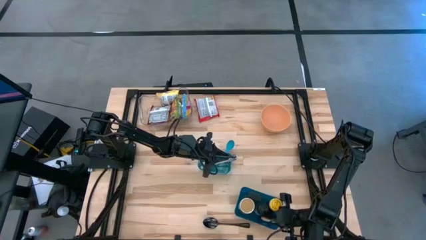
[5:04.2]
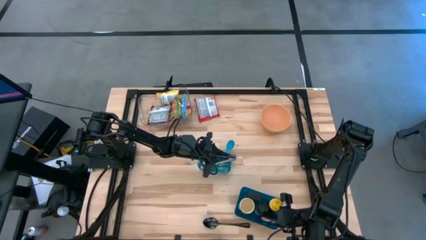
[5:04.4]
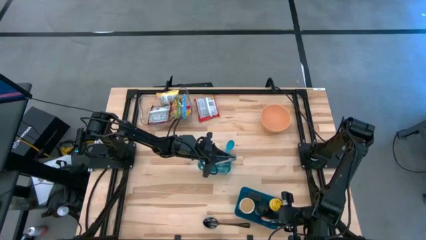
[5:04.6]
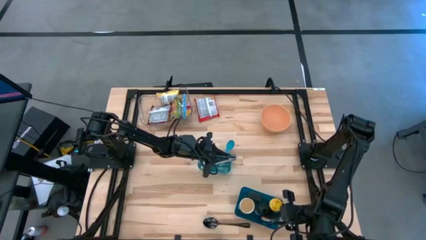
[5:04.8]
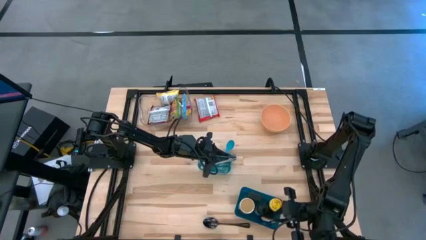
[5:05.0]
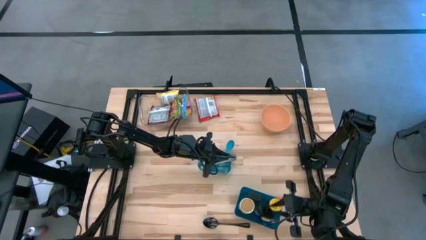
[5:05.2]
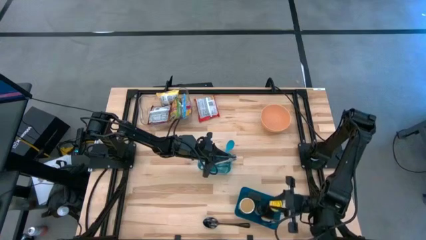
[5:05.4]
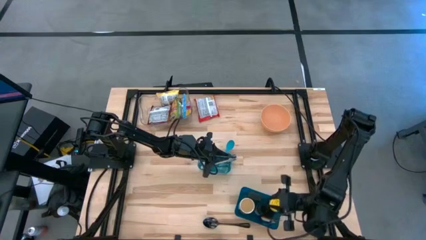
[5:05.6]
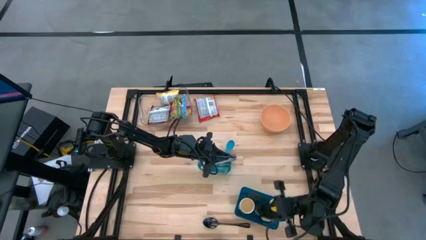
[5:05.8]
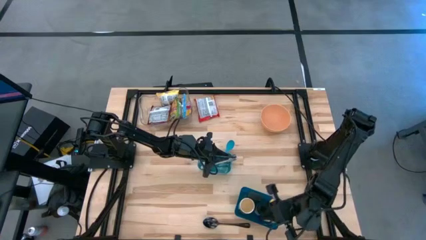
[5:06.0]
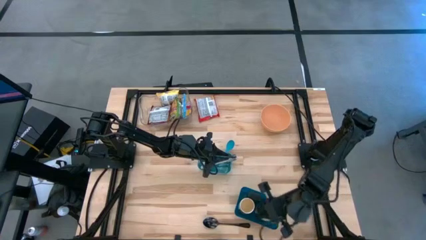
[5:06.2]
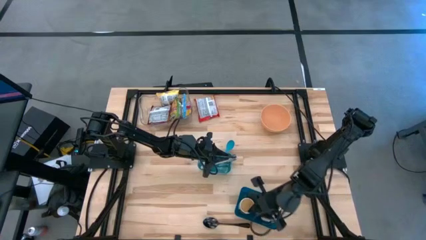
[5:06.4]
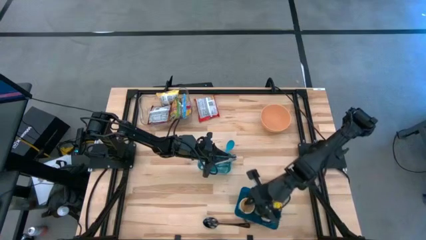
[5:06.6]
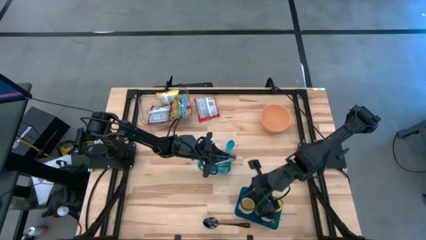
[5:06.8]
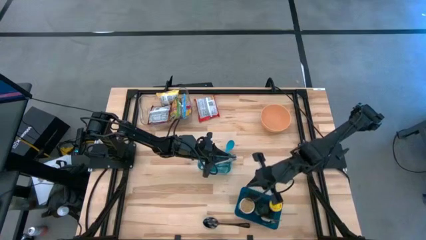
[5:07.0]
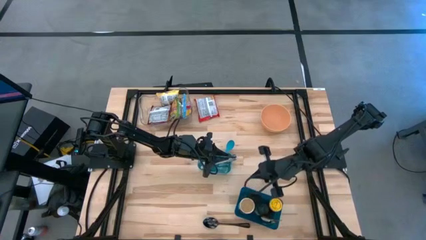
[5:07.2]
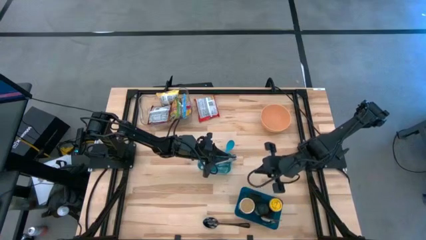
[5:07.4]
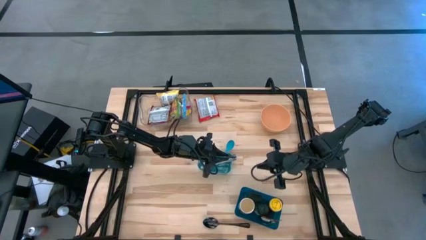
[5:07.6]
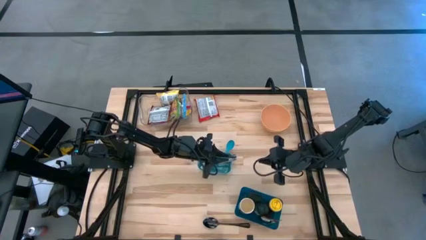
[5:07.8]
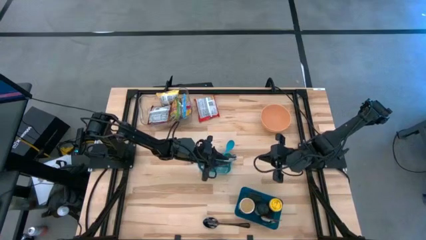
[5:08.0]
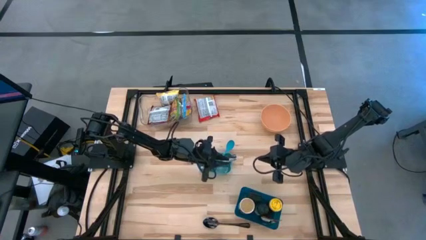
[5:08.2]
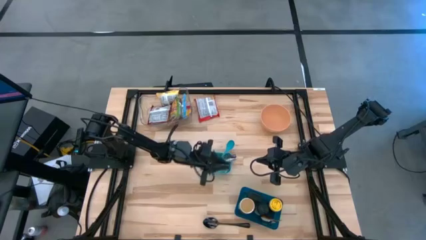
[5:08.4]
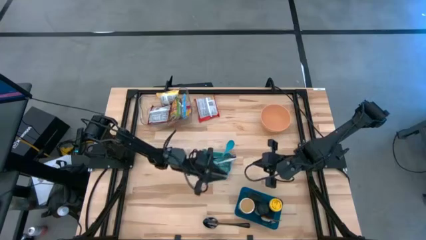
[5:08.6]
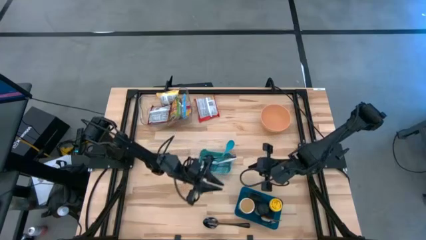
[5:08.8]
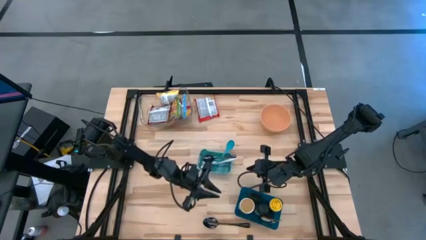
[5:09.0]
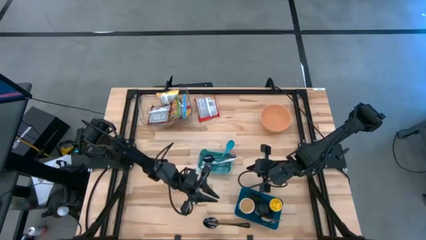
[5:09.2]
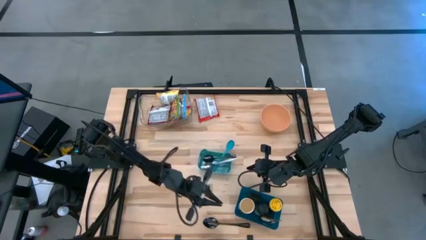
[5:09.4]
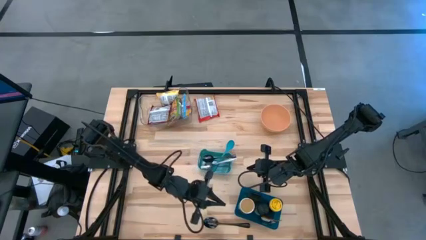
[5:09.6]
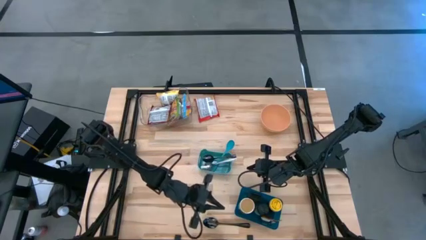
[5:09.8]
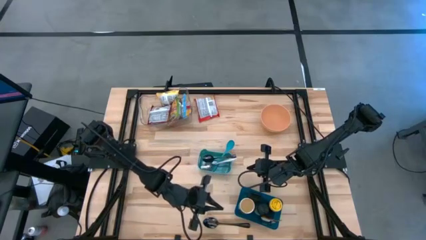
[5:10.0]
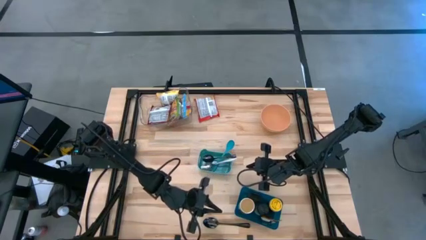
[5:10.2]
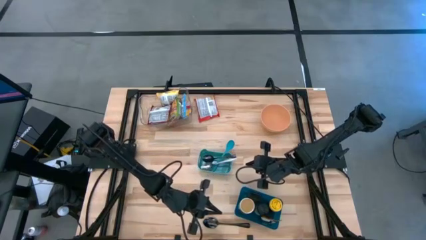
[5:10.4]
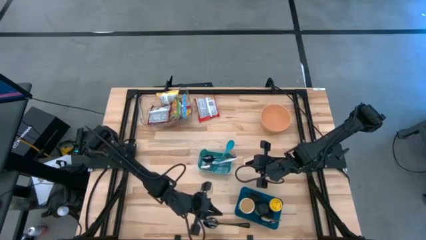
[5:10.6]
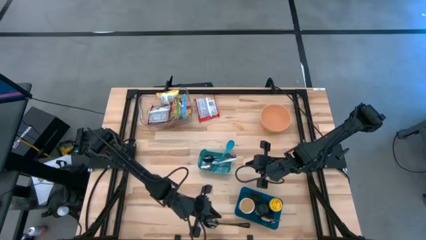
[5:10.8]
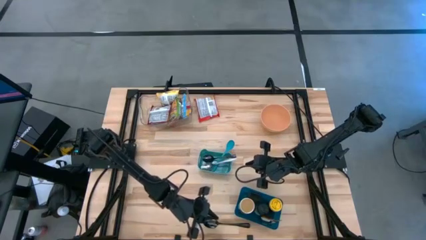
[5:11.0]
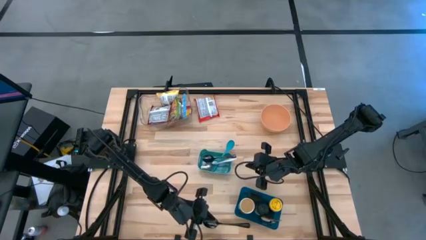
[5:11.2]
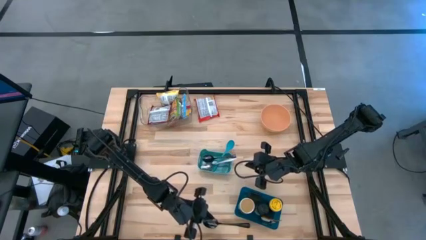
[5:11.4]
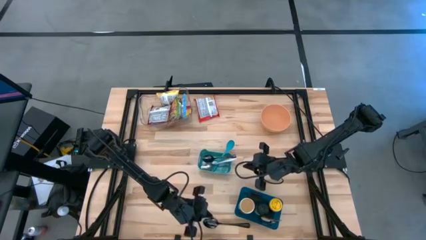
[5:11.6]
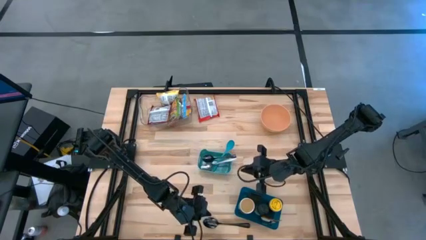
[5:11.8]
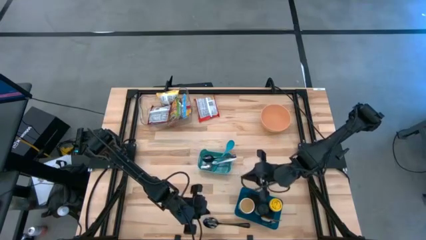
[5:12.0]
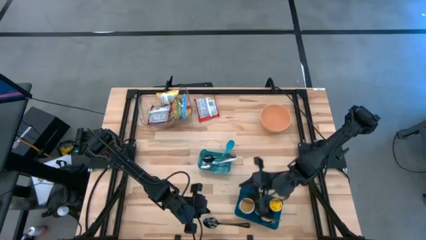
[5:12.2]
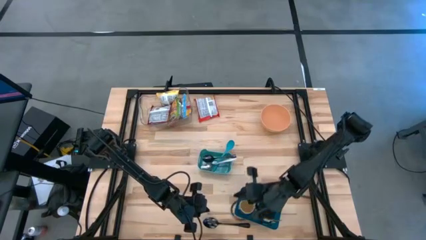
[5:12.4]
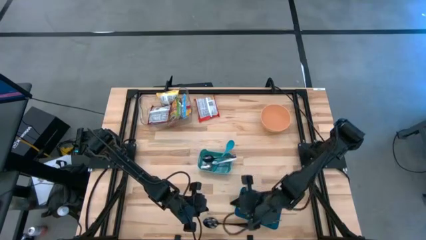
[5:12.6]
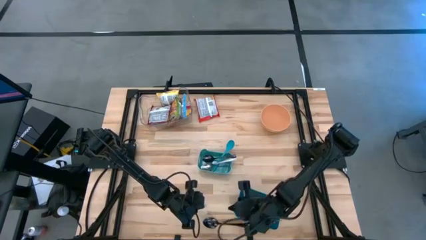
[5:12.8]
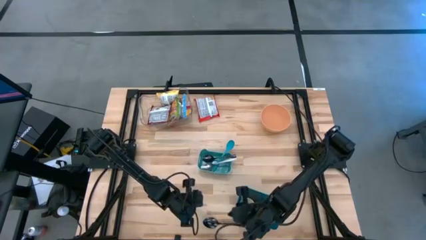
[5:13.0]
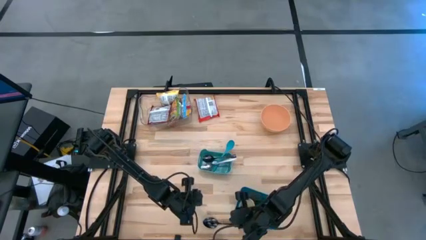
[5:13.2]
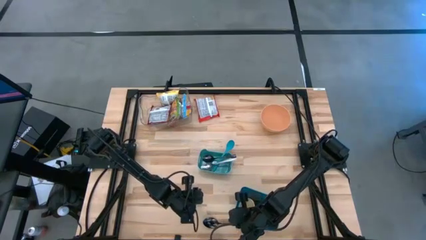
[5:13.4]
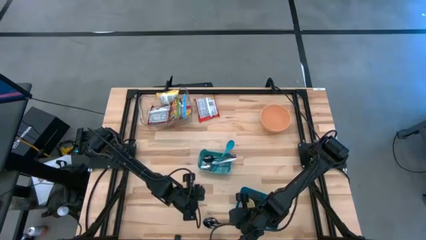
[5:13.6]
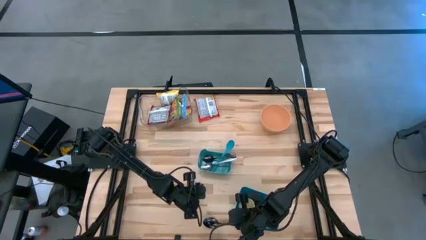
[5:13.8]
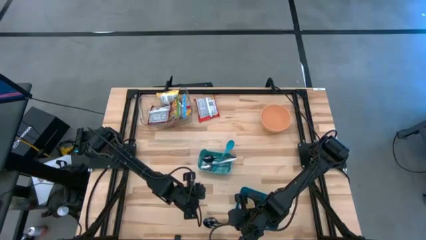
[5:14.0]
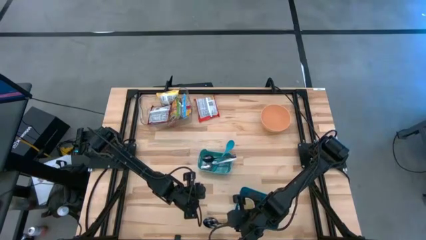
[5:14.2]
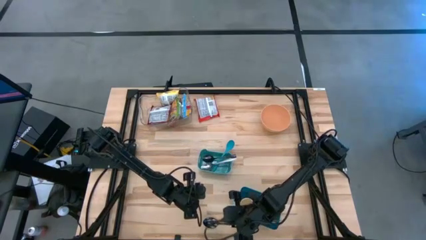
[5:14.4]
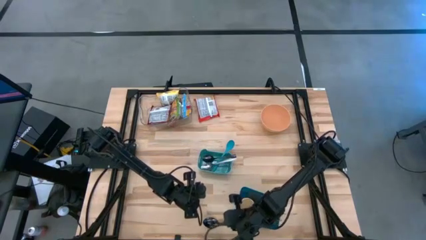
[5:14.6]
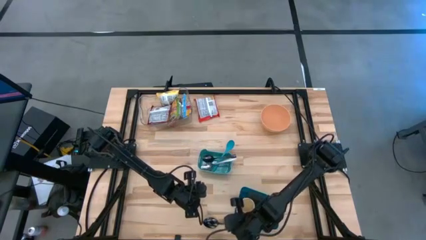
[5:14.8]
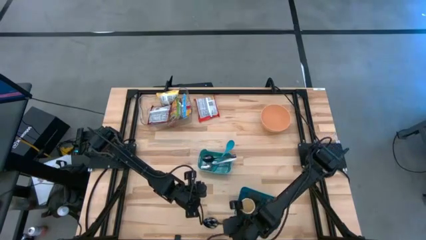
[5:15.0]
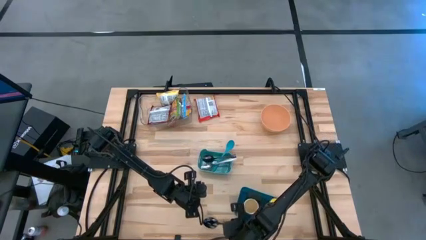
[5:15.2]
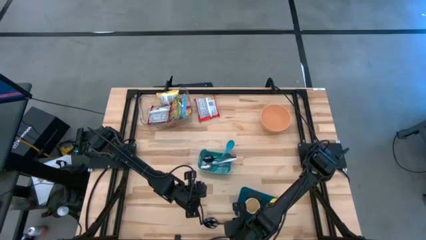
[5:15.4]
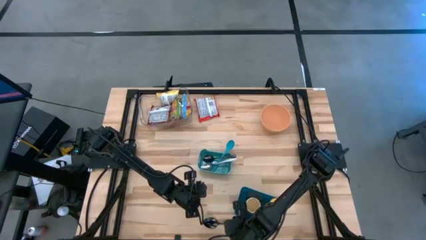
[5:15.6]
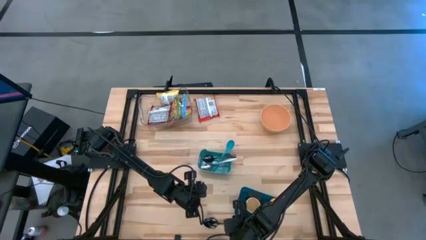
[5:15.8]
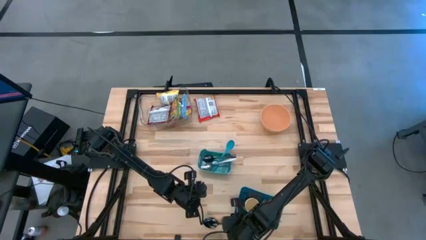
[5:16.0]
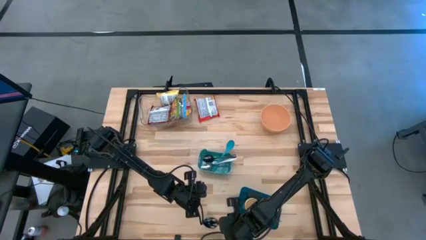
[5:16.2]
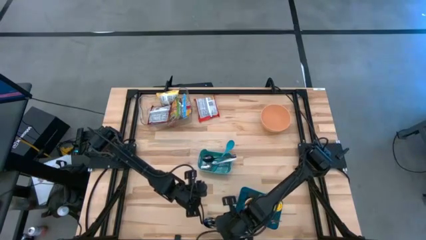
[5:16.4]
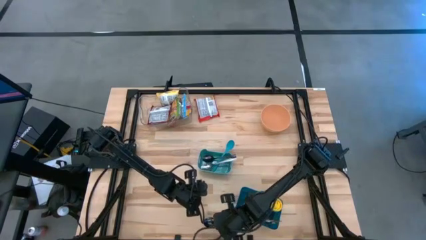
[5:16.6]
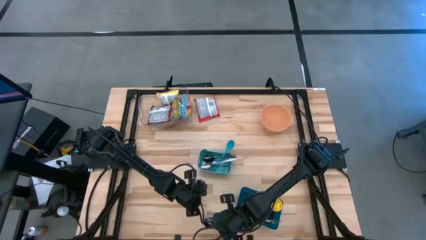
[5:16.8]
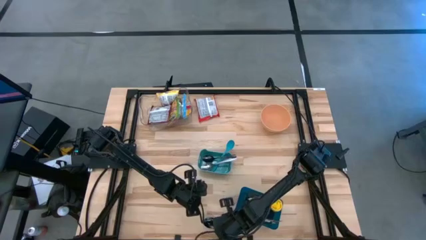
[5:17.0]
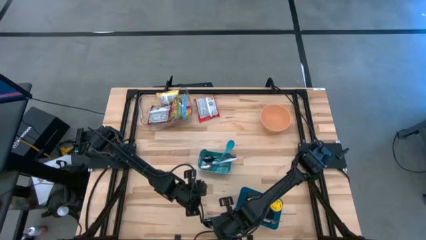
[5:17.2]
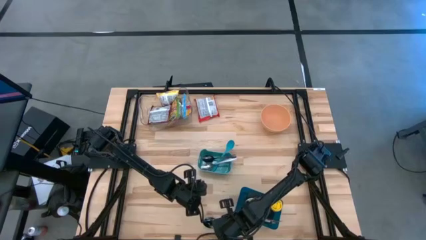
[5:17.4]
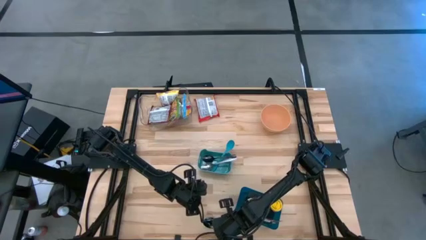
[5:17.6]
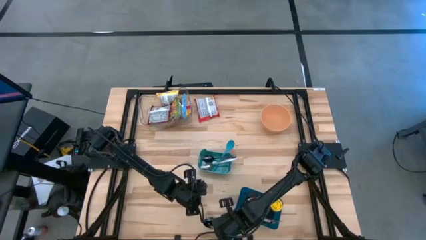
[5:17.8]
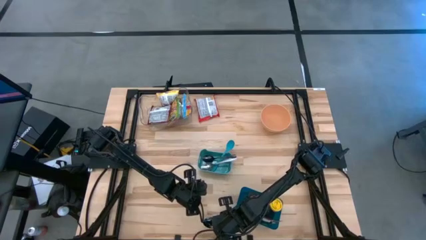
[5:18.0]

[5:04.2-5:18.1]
Task: Pick & Place Food Item
Put the black tablespoon into the green bin
